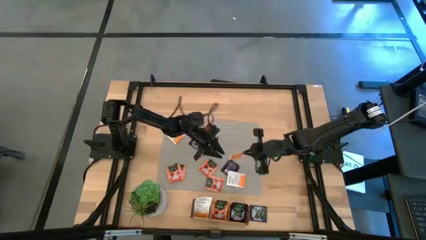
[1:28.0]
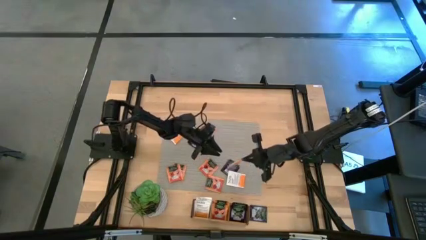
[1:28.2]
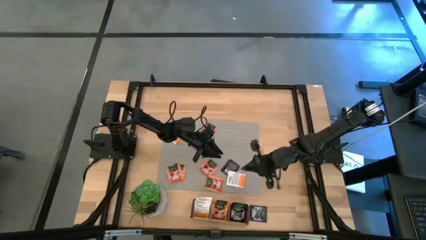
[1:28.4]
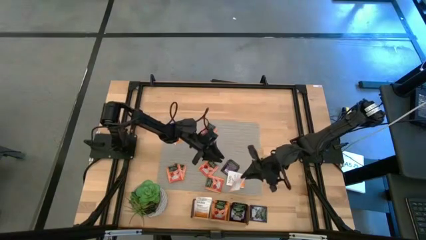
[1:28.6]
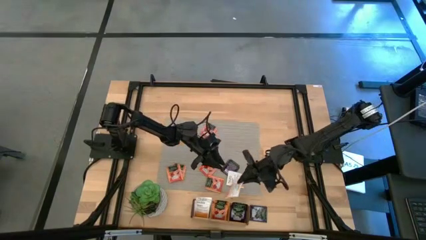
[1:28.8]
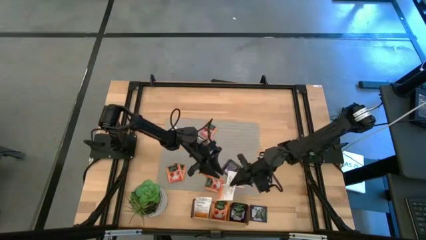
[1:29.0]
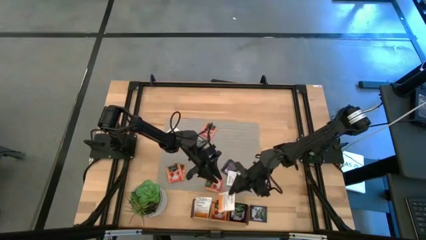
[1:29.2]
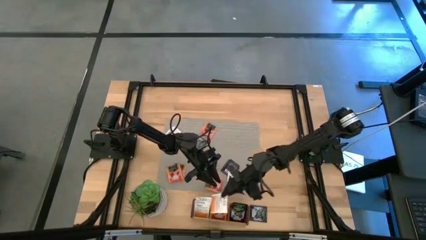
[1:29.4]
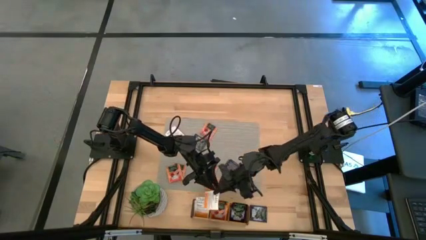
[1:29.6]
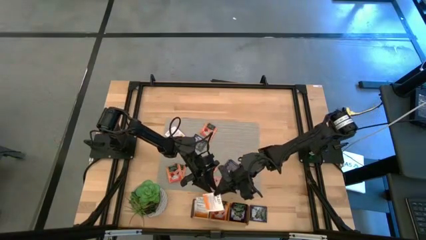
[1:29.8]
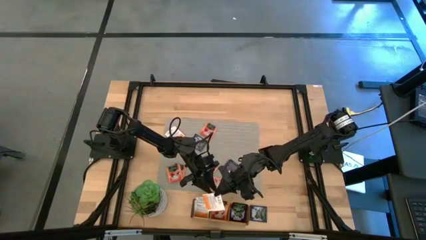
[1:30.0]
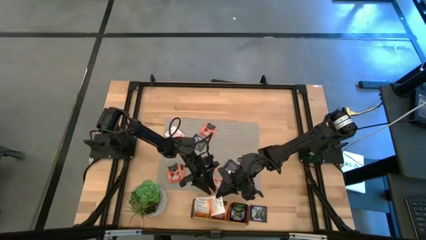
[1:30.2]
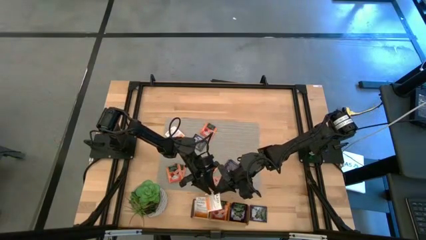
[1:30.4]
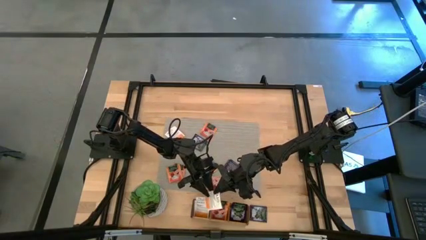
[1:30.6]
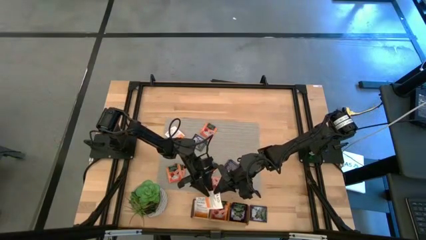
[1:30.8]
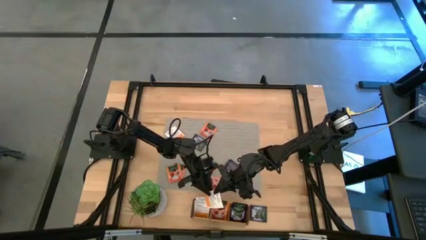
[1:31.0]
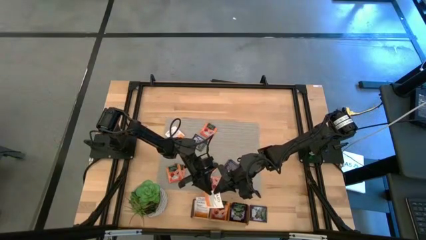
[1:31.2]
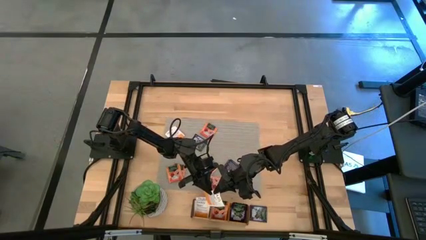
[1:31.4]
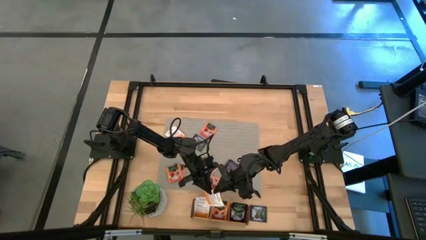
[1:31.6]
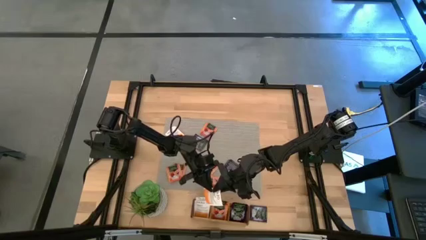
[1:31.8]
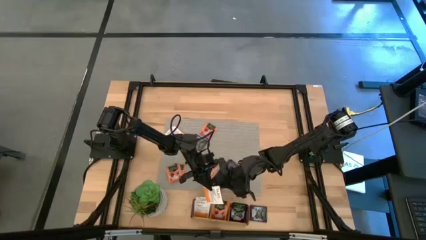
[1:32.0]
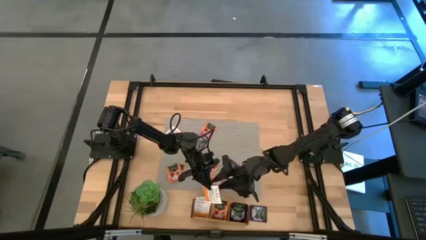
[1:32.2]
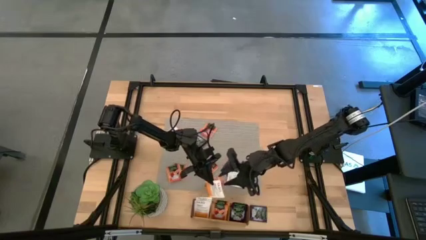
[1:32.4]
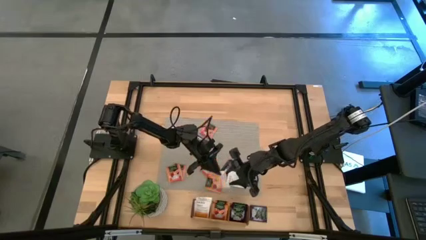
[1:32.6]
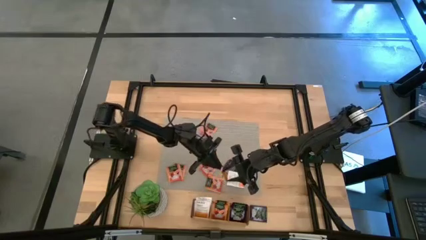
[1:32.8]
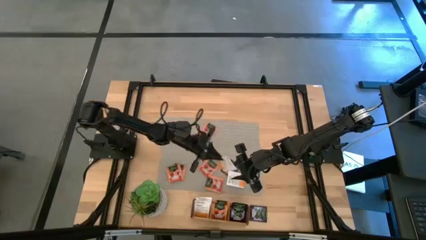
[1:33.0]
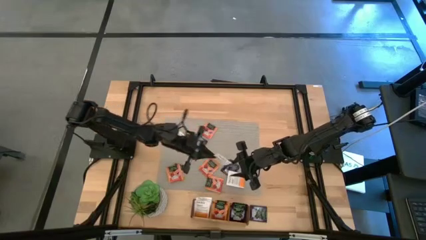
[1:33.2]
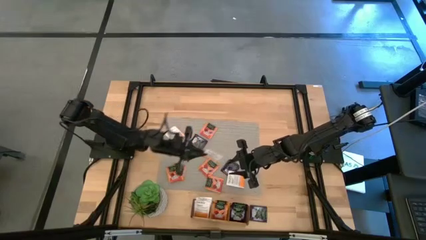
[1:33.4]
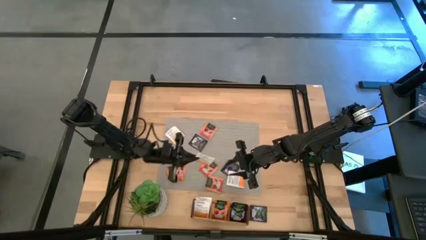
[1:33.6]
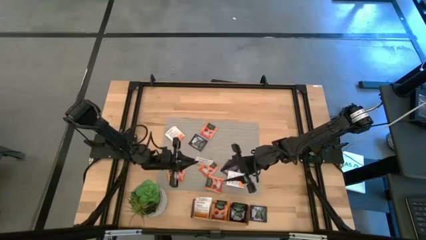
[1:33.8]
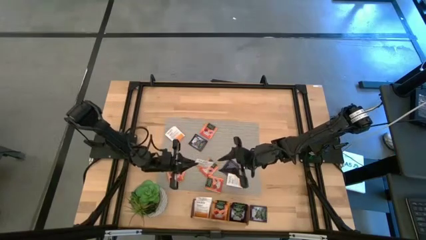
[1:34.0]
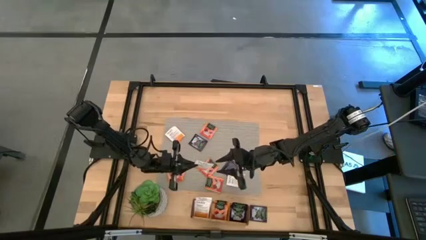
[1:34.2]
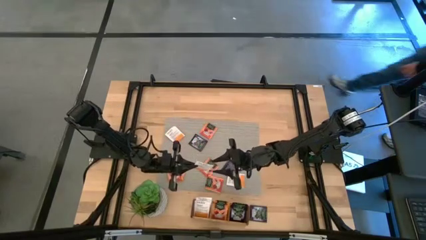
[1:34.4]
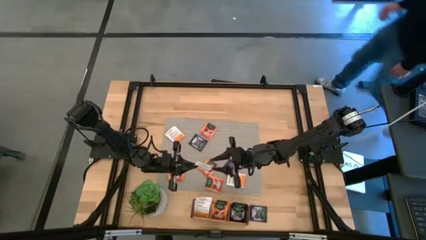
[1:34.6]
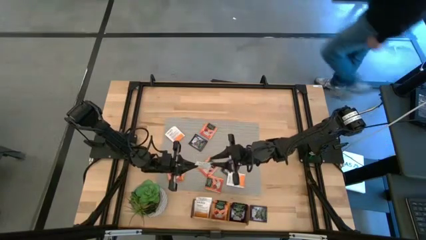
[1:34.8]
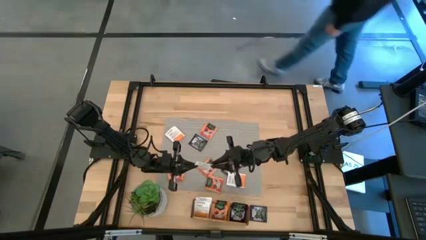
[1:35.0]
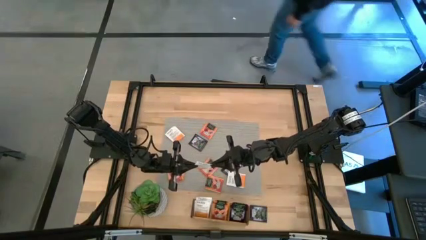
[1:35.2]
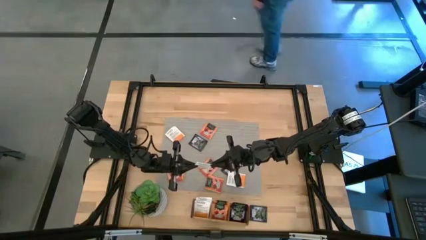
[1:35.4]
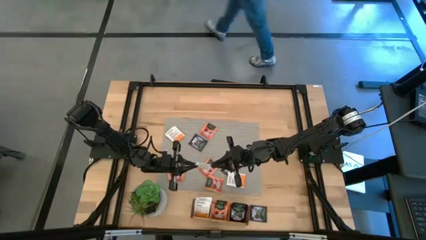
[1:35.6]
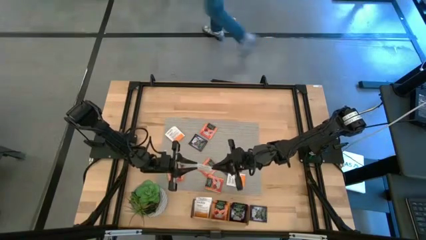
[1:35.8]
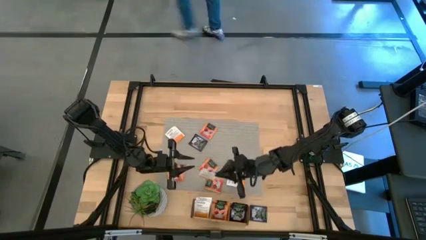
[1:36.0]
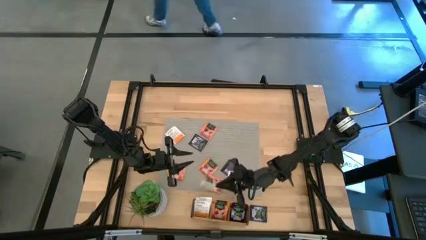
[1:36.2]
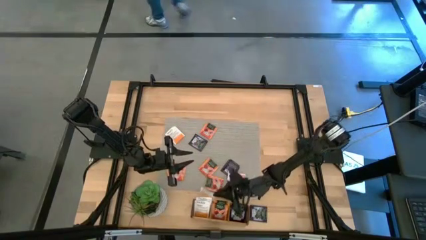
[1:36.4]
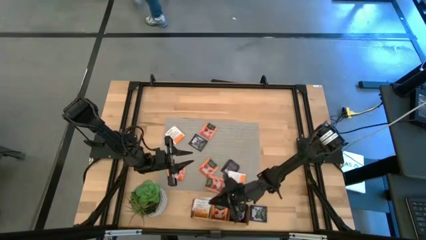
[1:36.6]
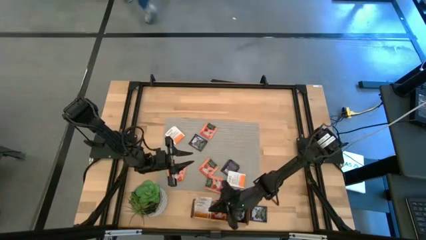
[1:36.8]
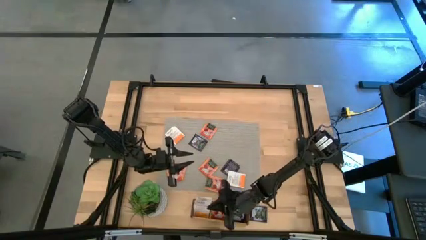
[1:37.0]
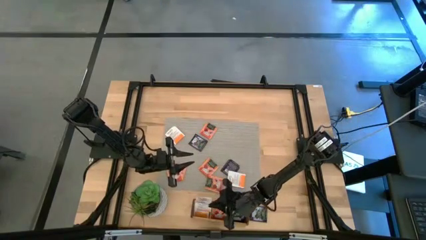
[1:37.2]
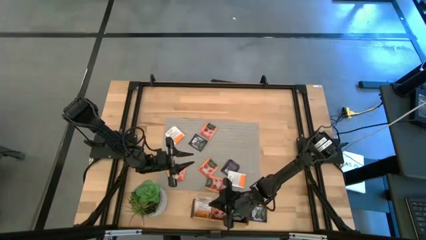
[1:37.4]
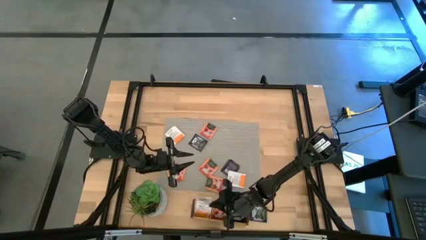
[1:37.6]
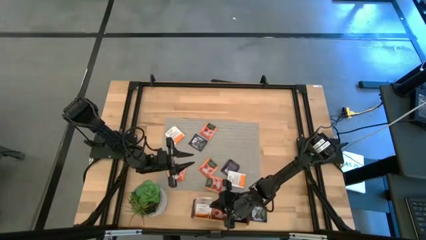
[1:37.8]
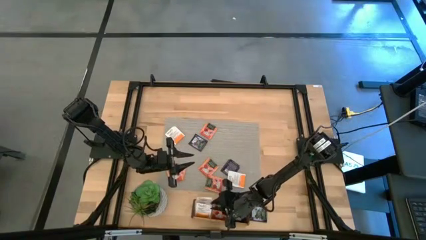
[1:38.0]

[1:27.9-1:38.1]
Task: Pick & Place Tea
Put the white and orange tea bag into the left section of the wooden organizer

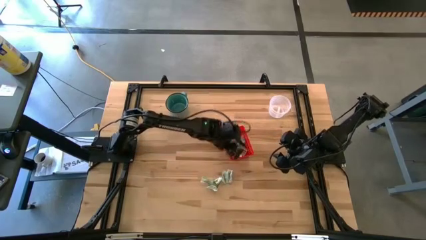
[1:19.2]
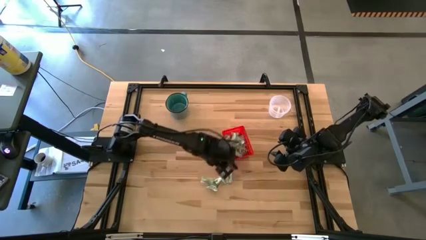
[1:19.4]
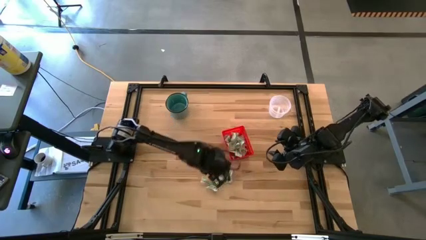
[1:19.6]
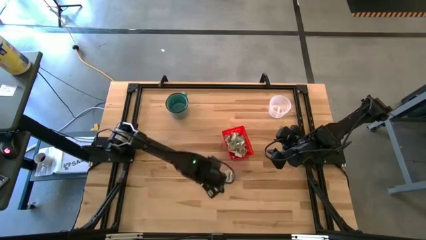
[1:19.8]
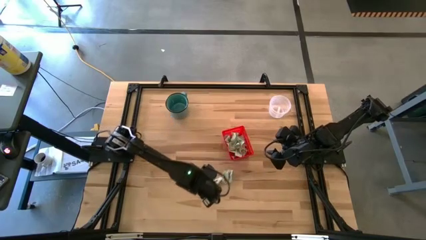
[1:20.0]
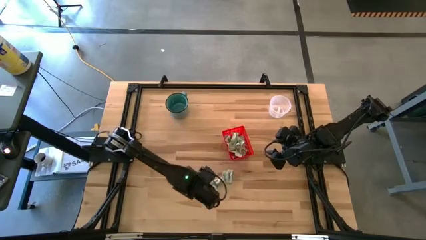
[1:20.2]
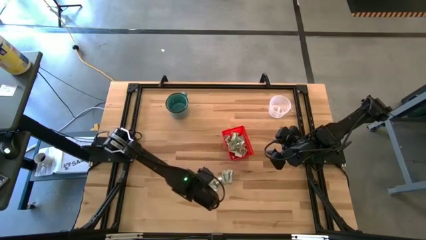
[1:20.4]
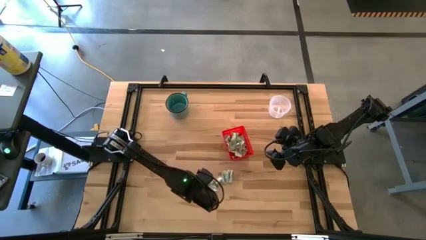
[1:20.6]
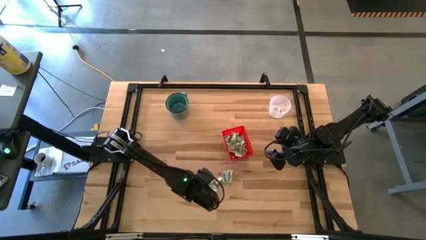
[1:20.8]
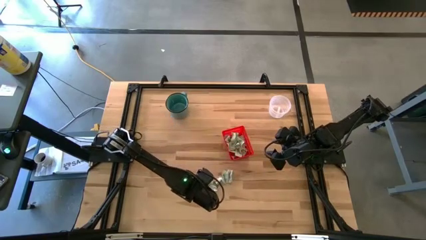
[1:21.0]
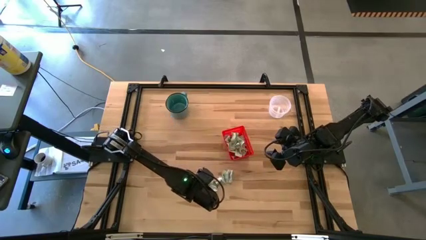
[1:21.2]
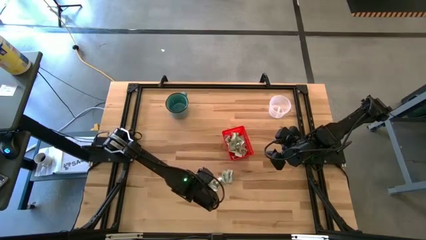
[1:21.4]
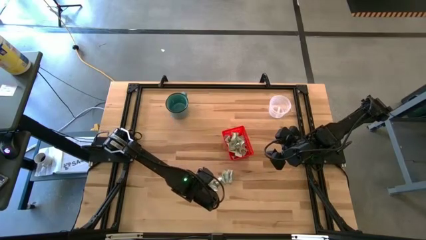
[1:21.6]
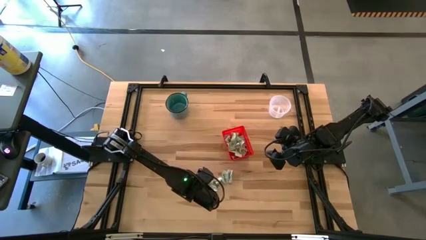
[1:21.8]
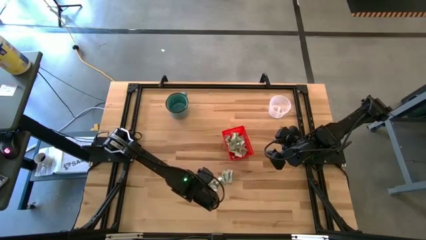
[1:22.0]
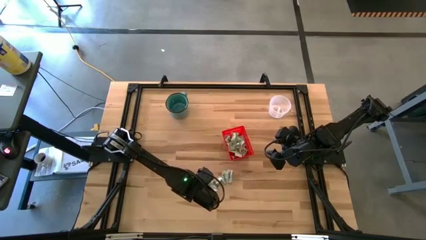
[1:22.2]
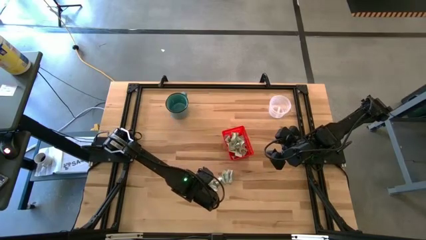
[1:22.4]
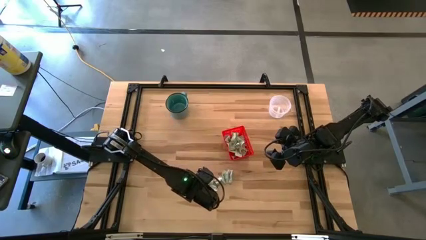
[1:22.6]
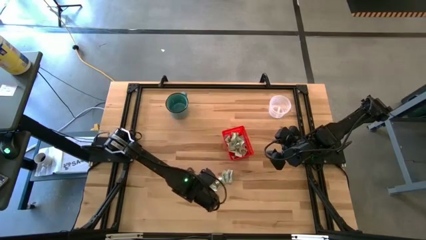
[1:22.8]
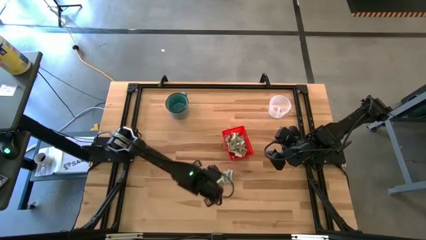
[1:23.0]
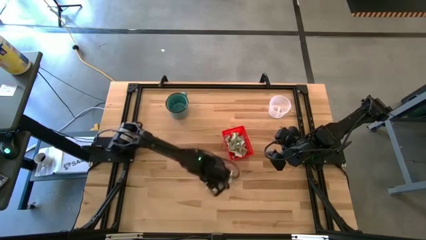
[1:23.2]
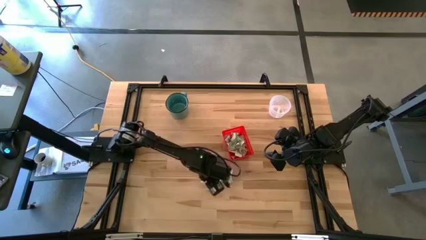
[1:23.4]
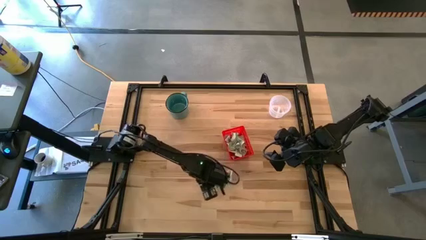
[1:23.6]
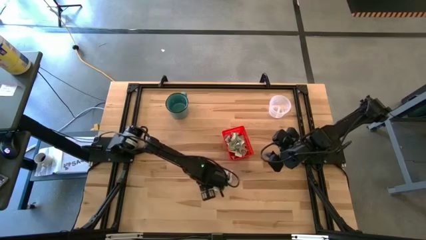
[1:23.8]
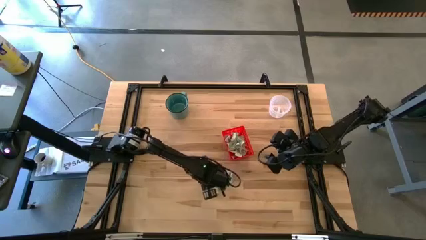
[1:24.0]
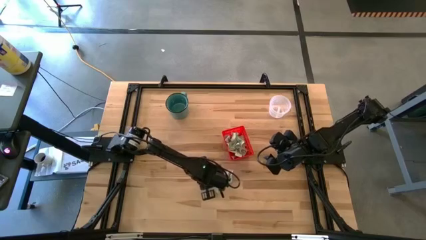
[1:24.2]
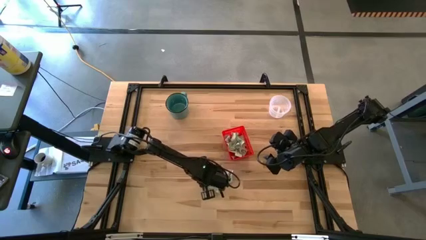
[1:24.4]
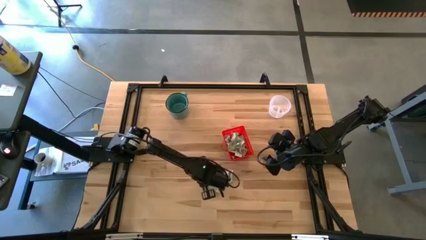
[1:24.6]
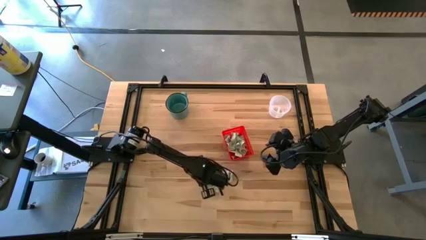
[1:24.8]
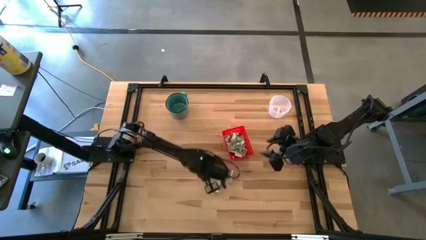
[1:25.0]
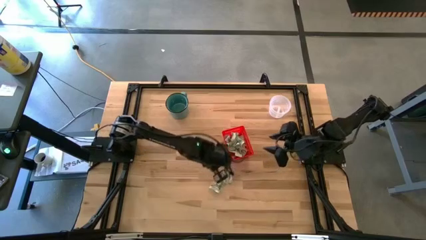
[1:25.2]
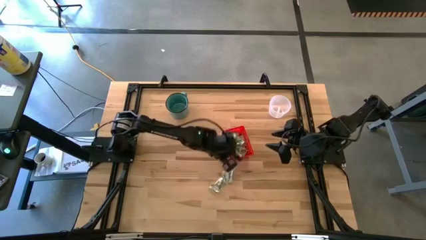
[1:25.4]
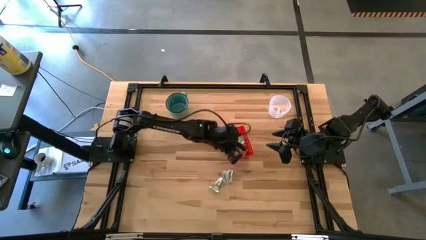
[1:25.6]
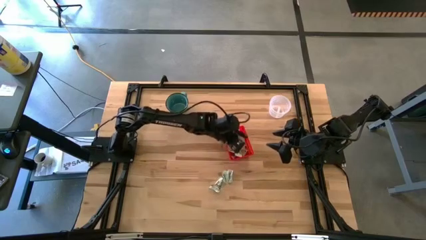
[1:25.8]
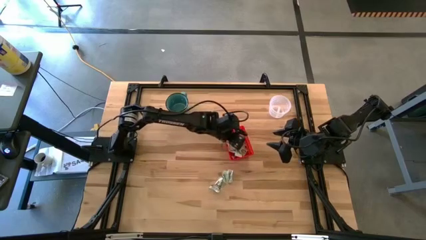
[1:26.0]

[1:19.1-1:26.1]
Task: Pick and place items into bin
Put the stevia packet into the orange bin
